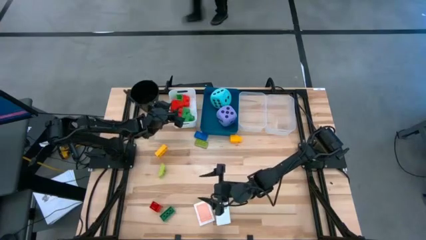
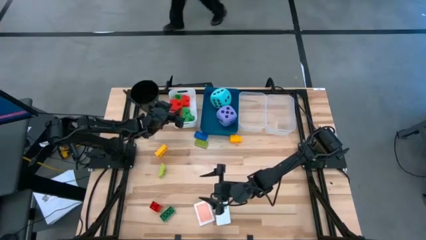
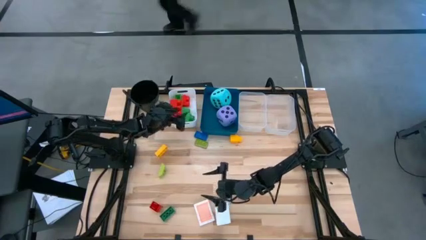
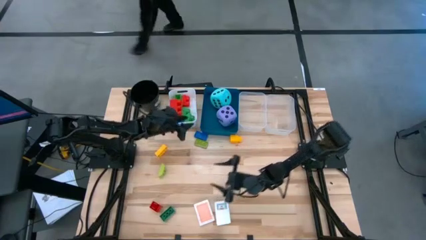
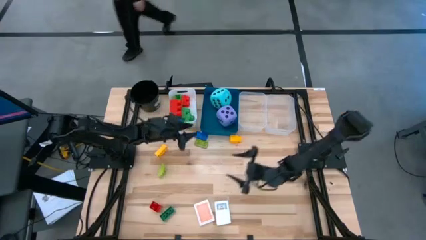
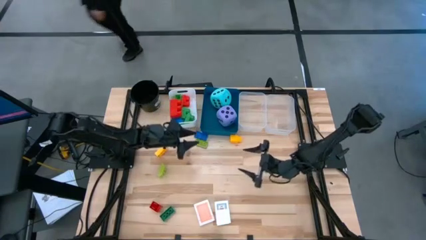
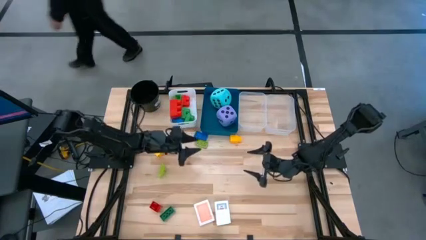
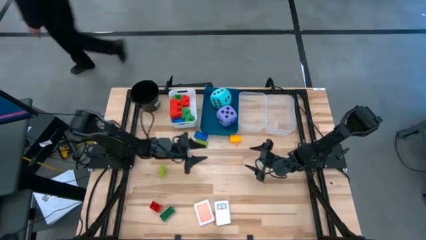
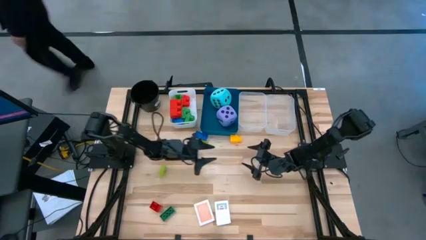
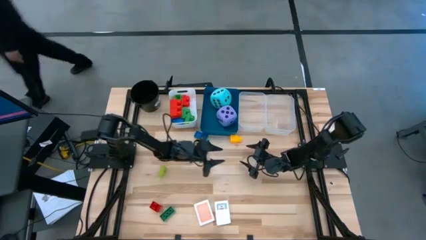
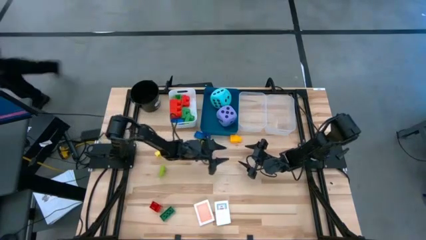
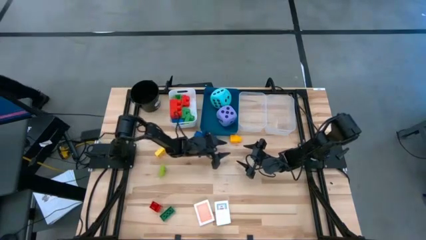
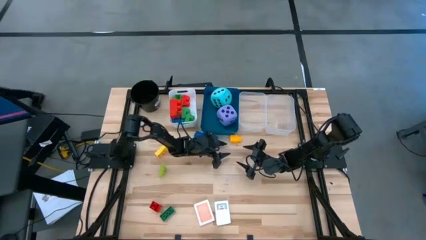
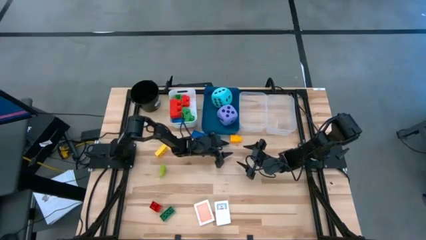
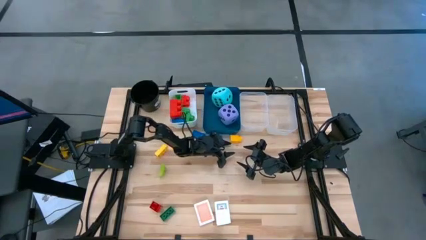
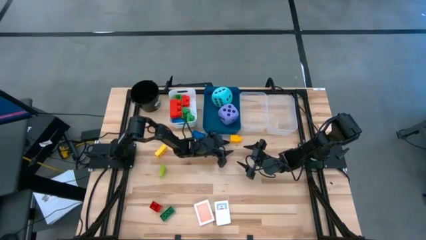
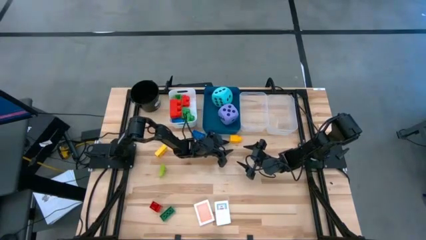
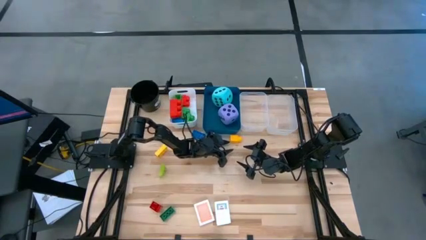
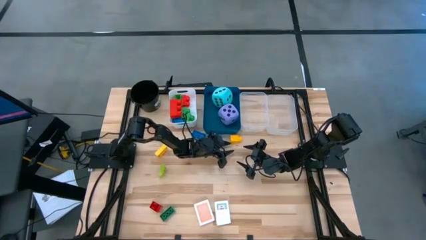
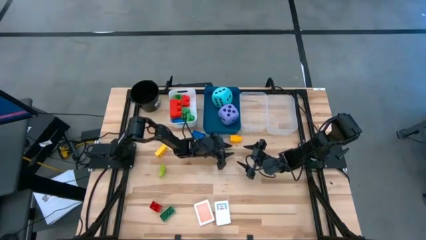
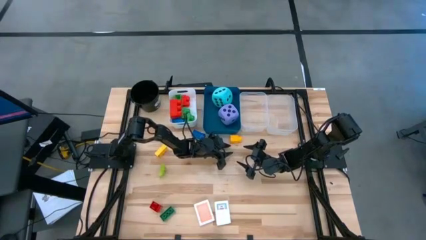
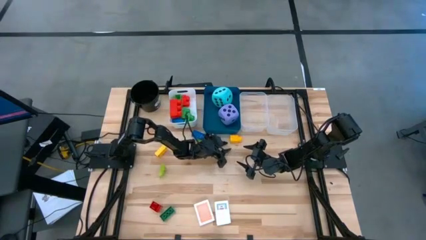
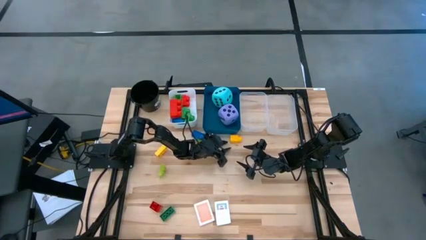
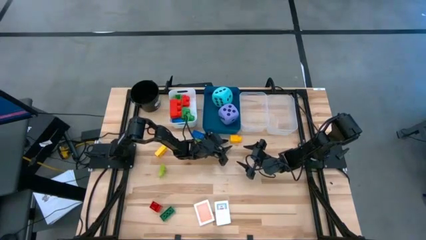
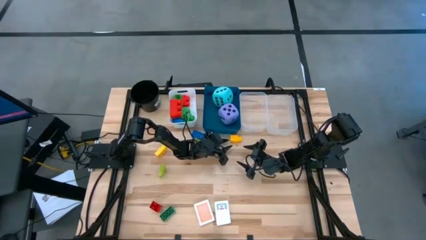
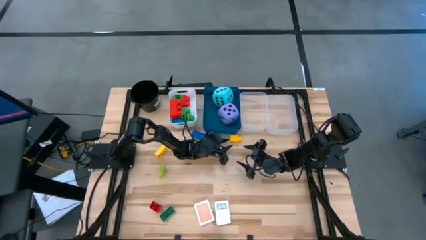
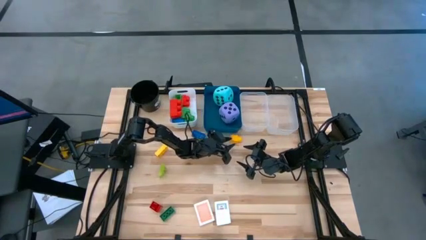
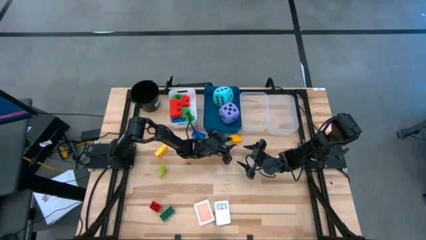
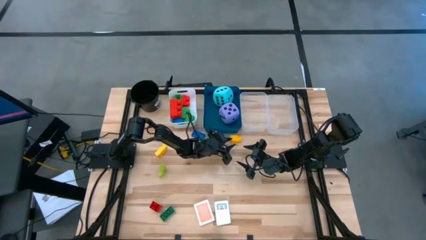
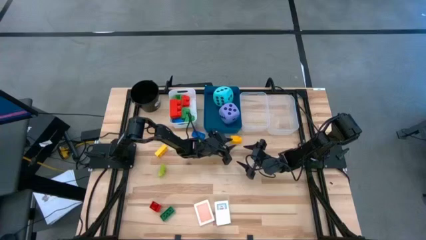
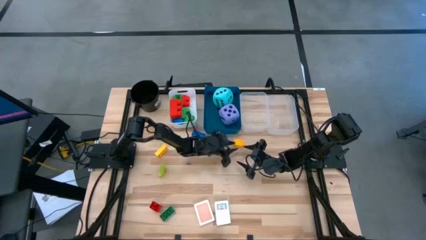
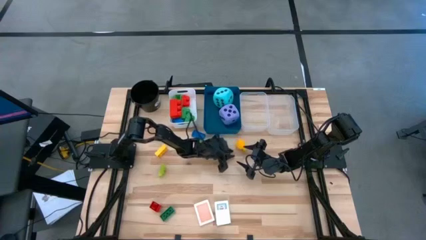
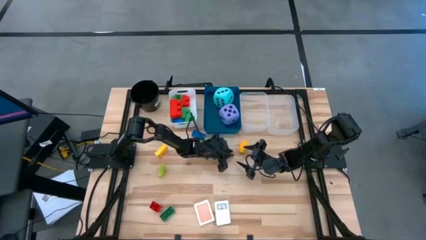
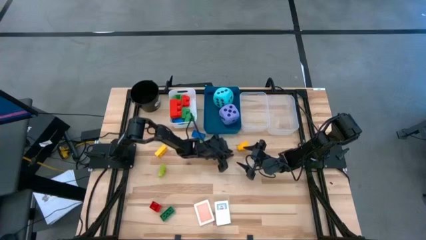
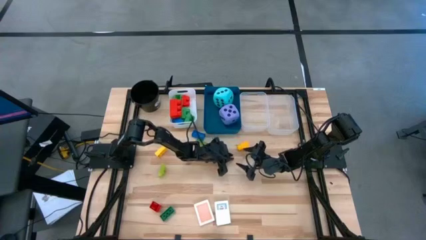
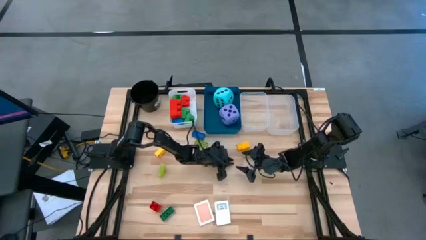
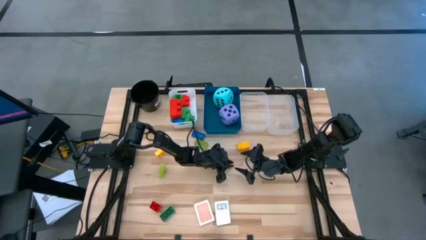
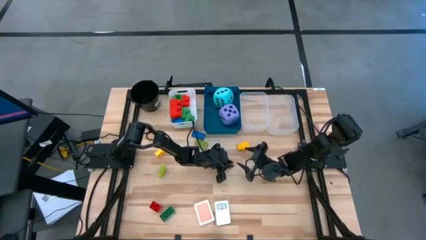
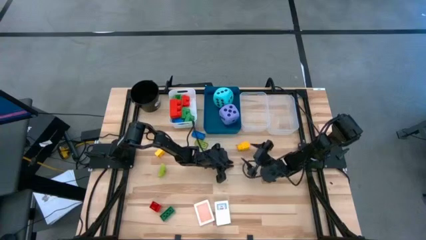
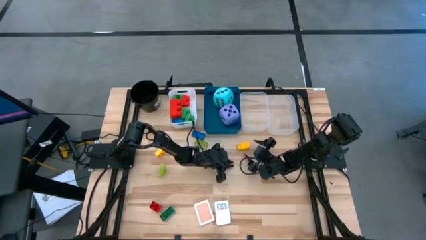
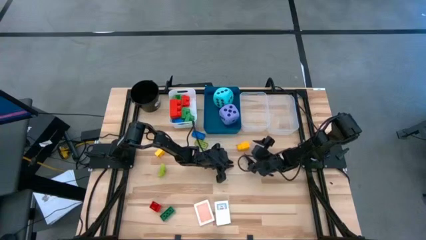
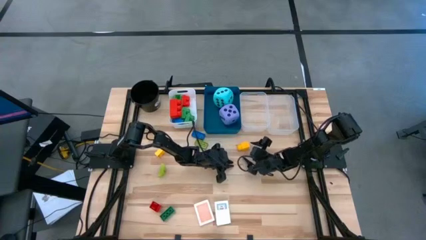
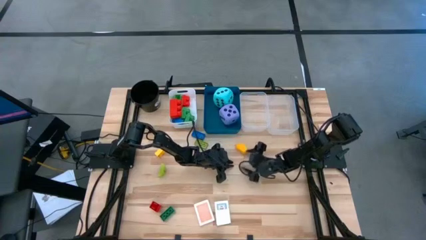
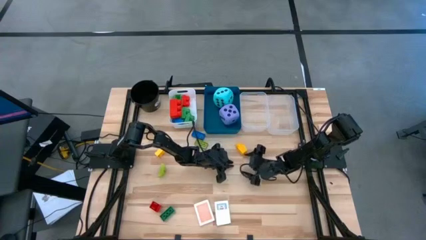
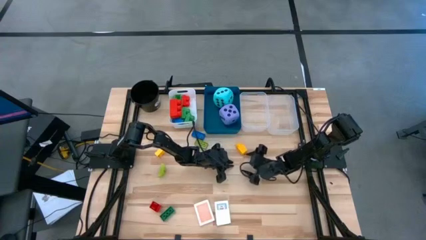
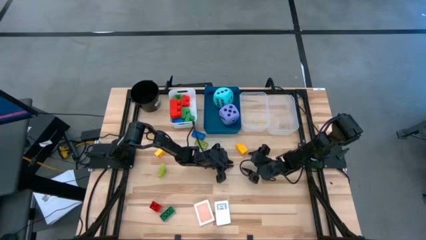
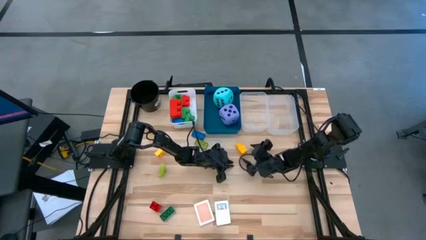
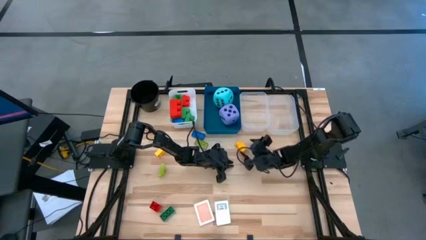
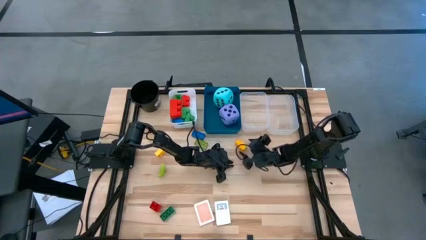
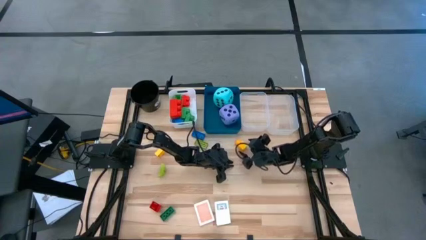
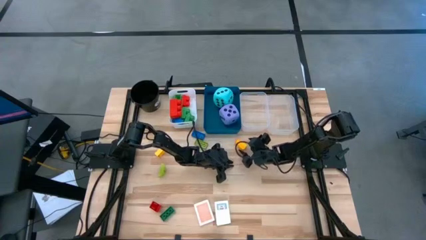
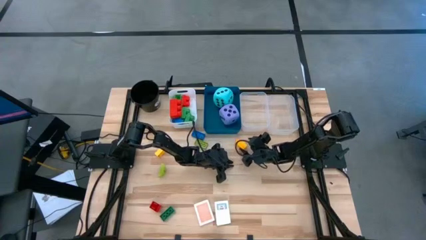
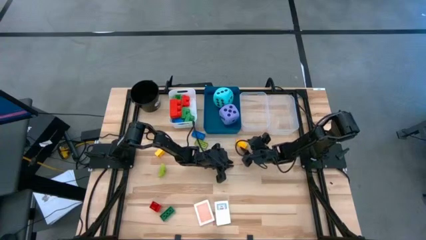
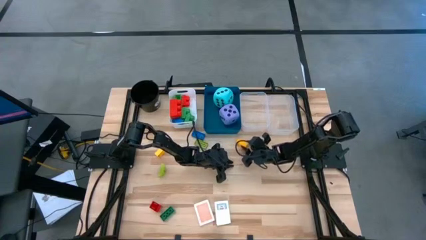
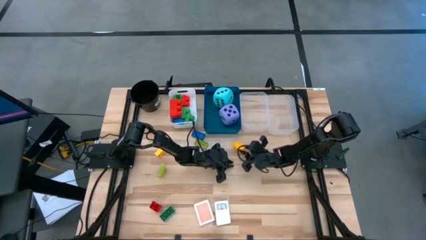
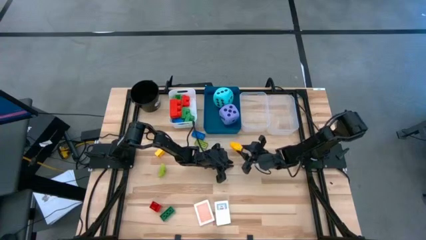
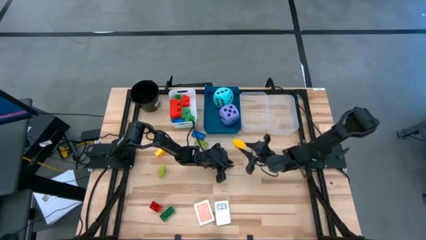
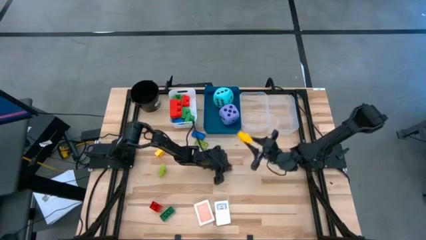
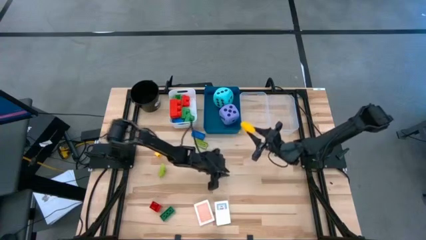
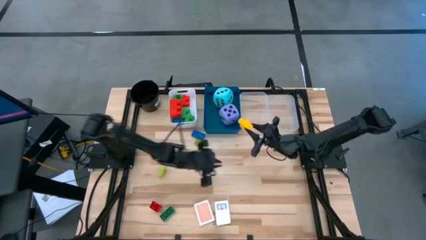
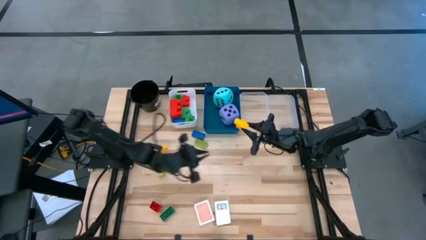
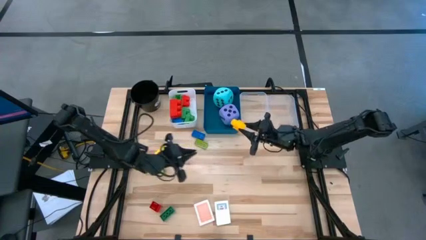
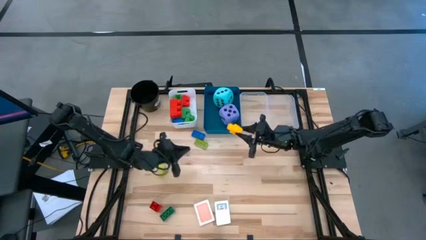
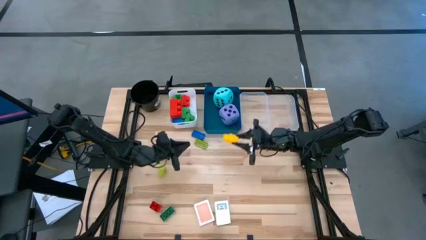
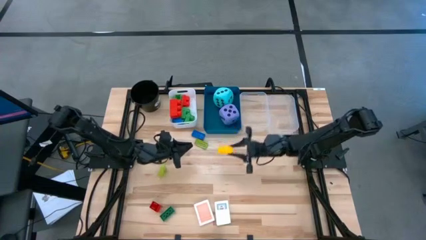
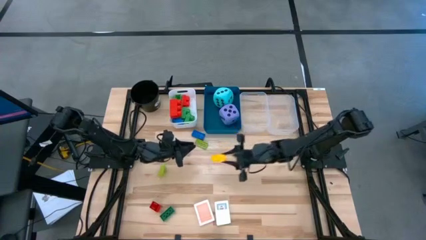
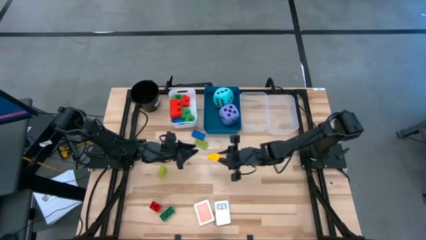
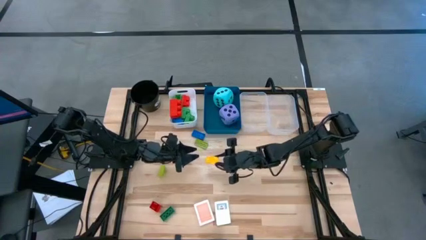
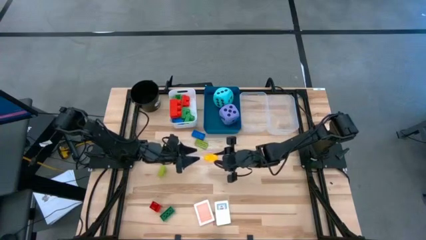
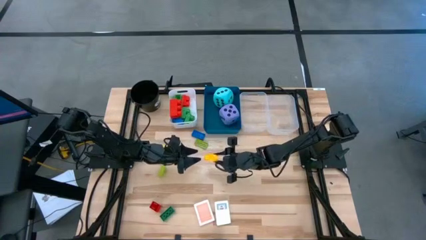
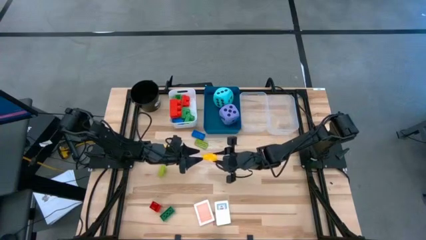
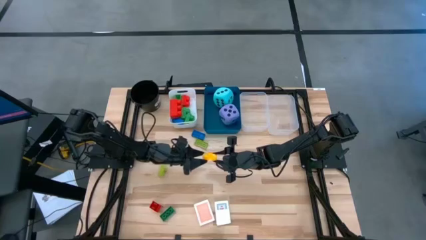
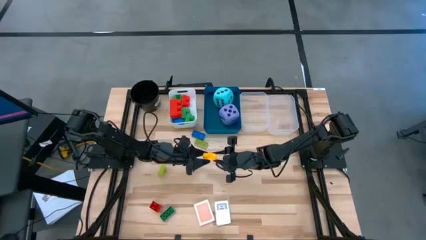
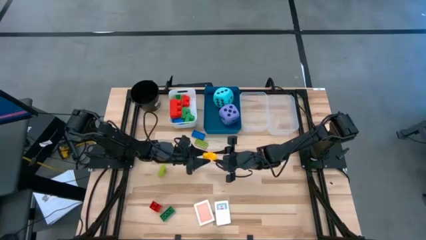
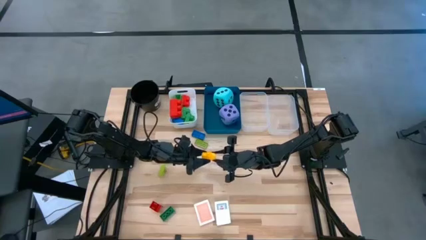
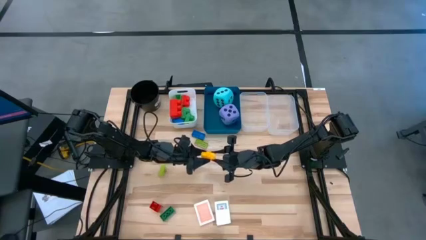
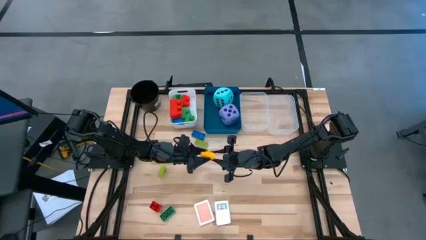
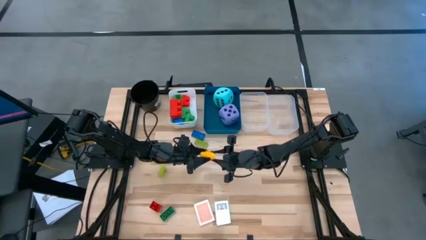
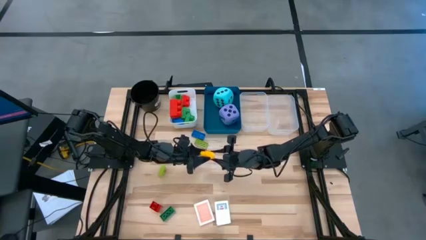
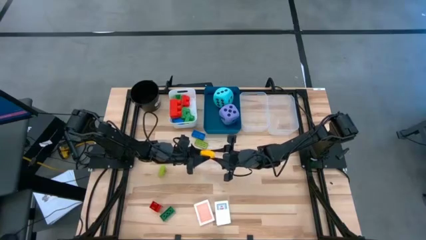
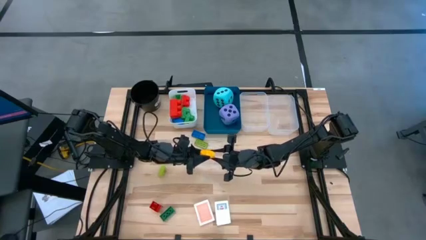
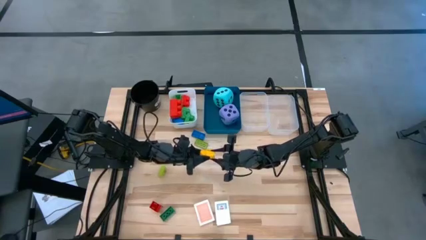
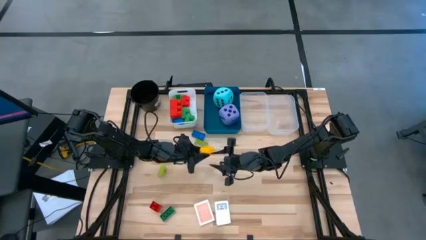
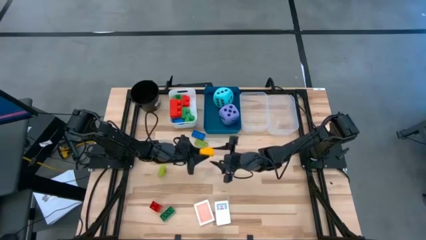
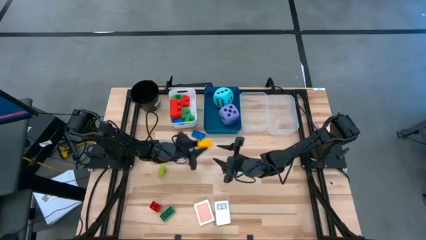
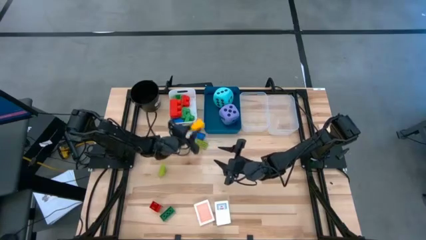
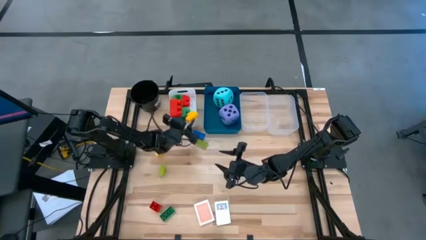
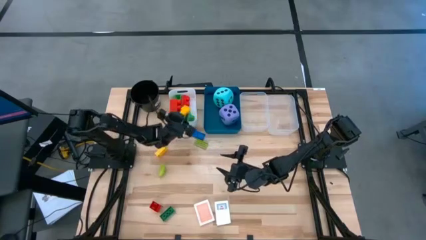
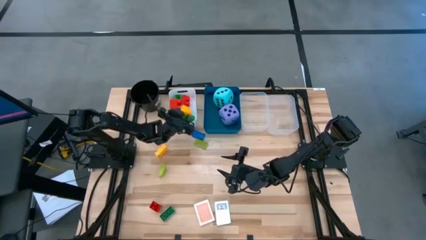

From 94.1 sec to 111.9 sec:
Task: Pick & Place Toys
Put the large yellow game piece into the white bin
